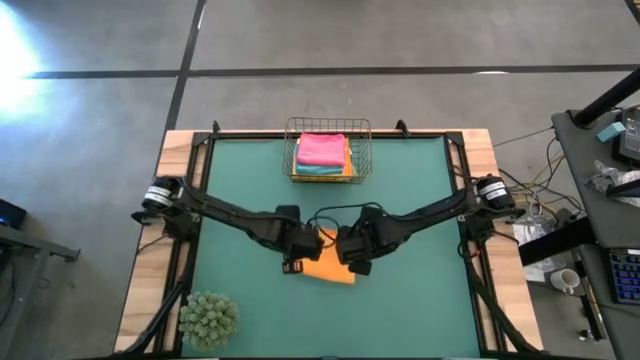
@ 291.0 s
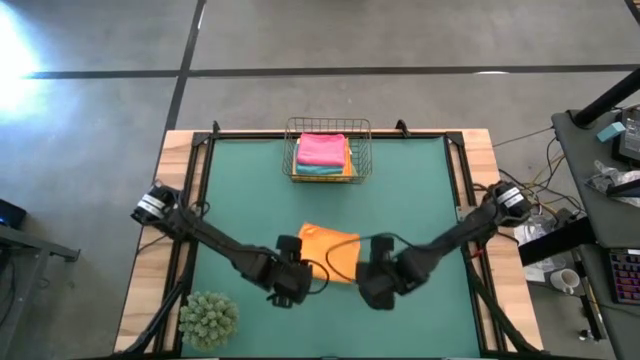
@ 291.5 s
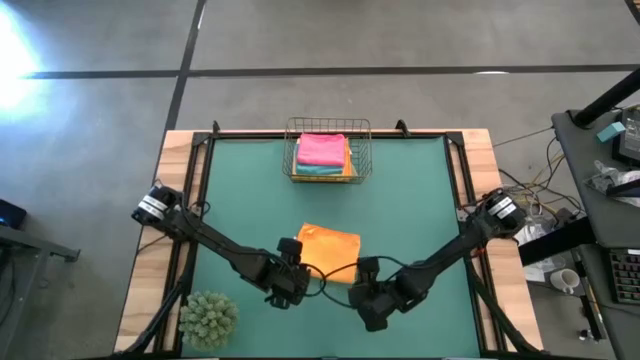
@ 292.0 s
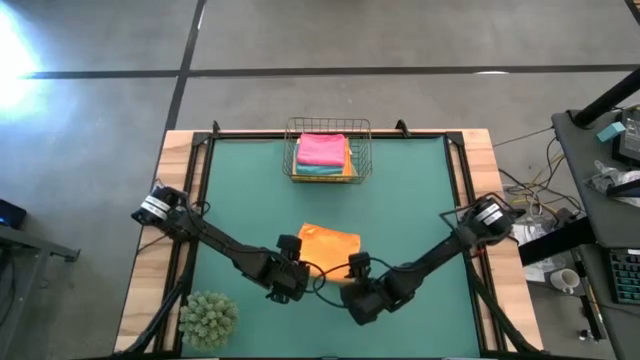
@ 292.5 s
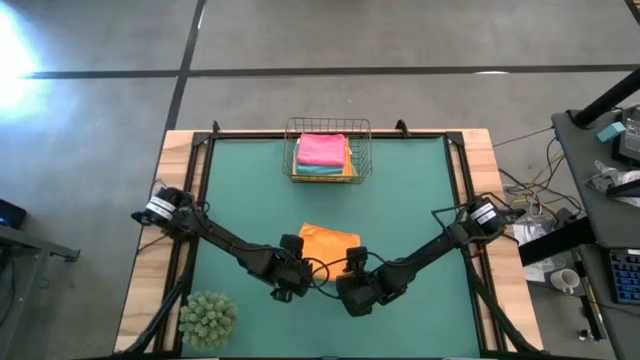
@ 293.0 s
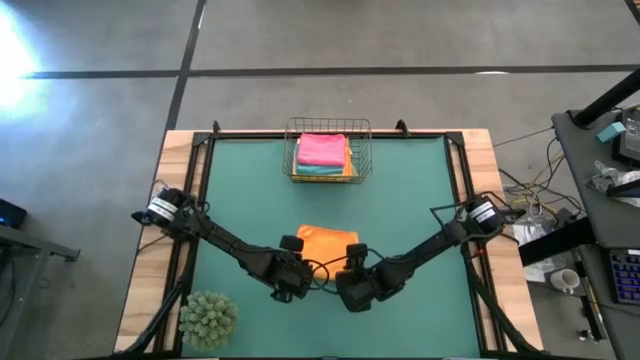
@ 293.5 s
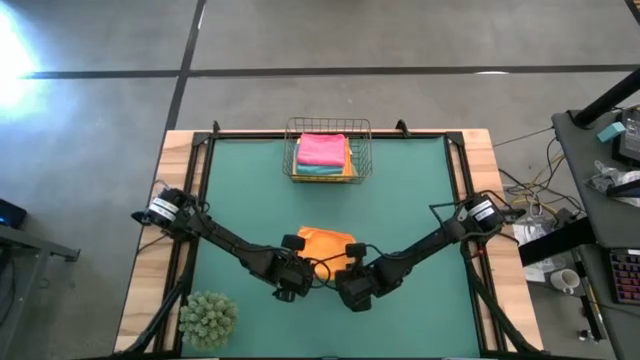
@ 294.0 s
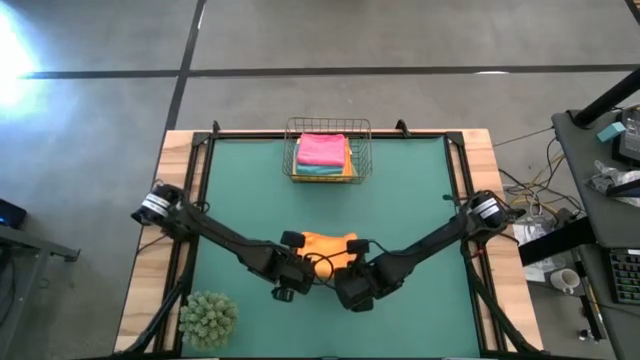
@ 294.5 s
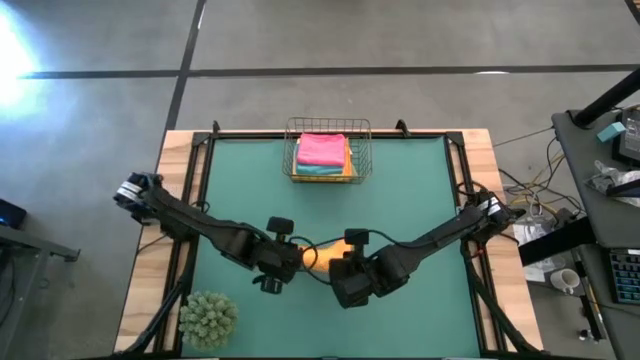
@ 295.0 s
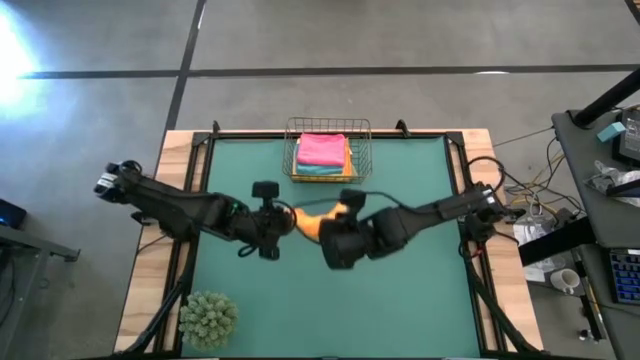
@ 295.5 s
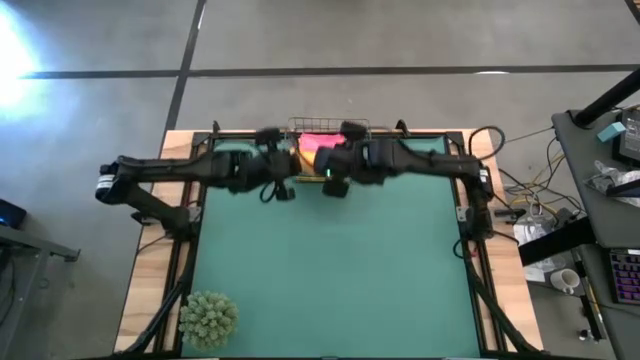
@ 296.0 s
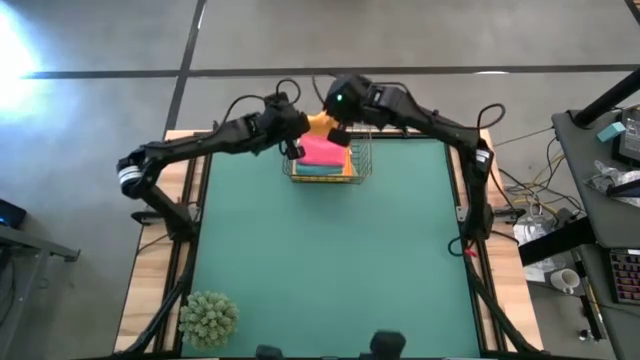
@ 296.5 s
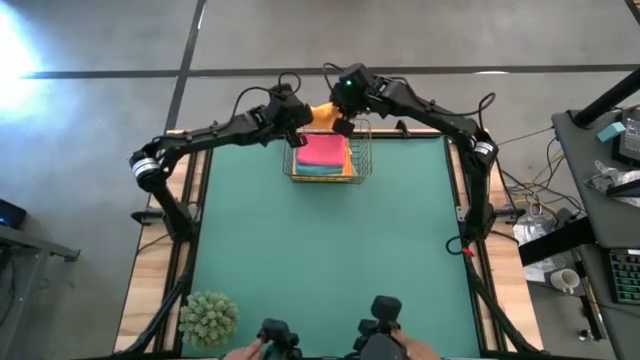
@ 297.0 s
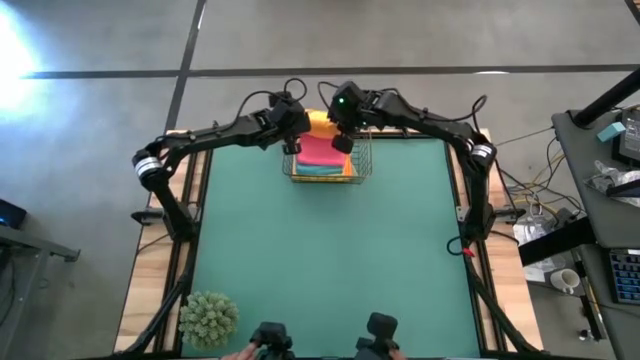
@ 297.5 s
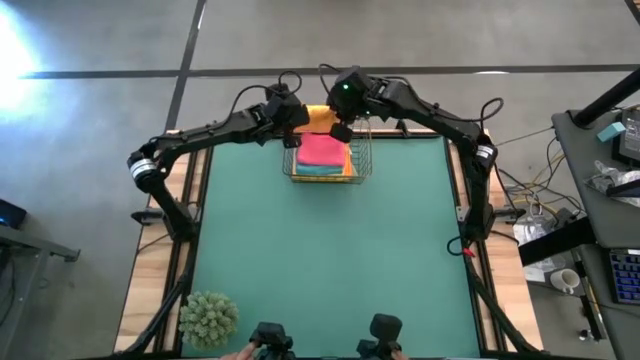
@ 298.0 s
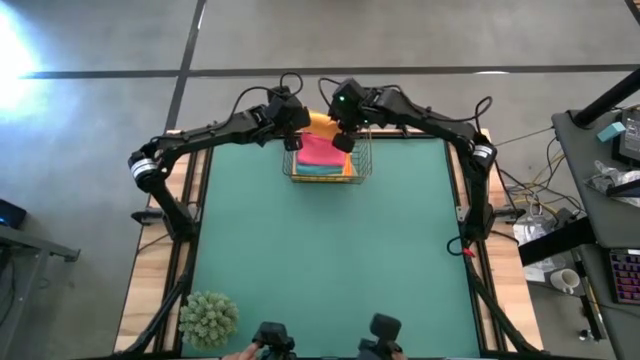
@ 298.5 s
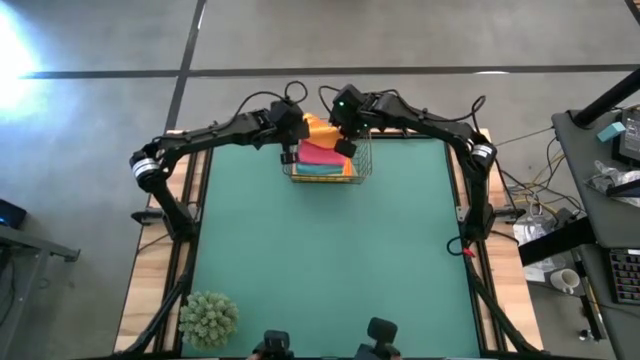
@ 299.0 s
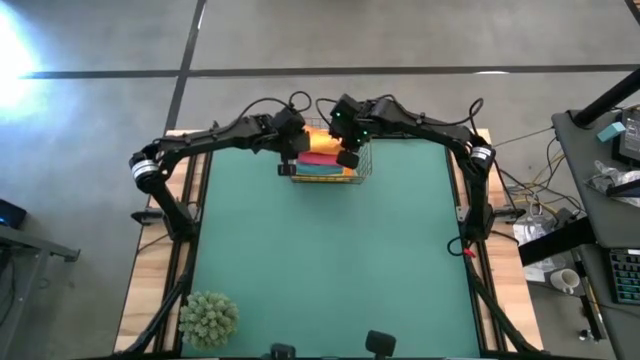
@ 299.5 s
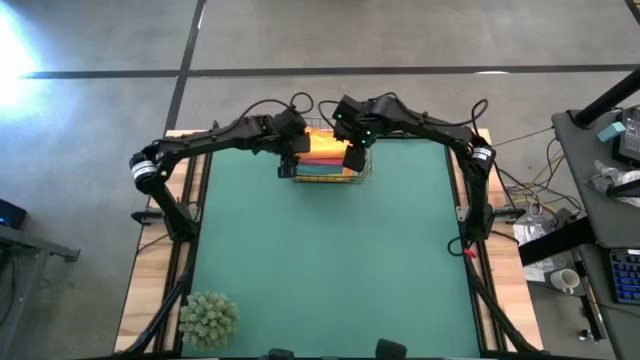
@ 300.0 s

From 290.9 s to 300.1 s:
Task: Fold microfiber towels
Put the yellow microfiber cloth into the wire basket

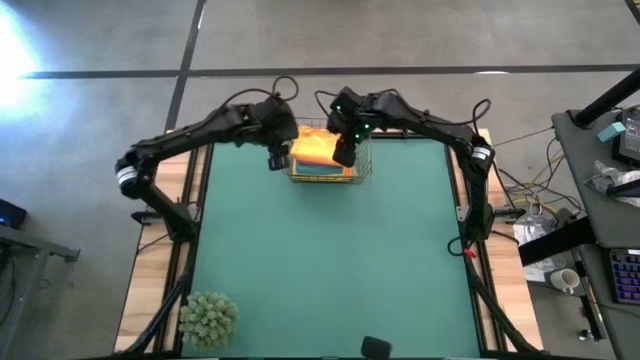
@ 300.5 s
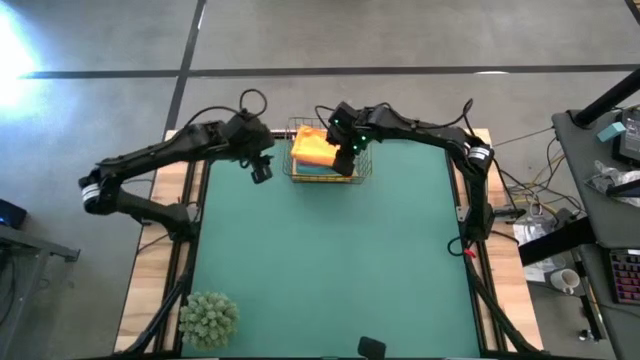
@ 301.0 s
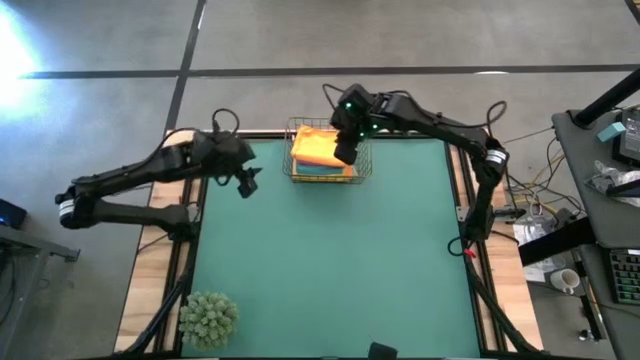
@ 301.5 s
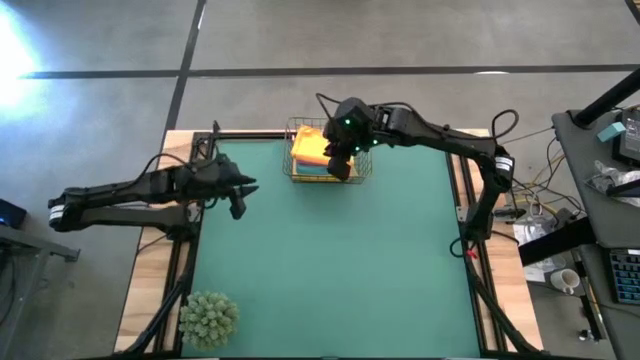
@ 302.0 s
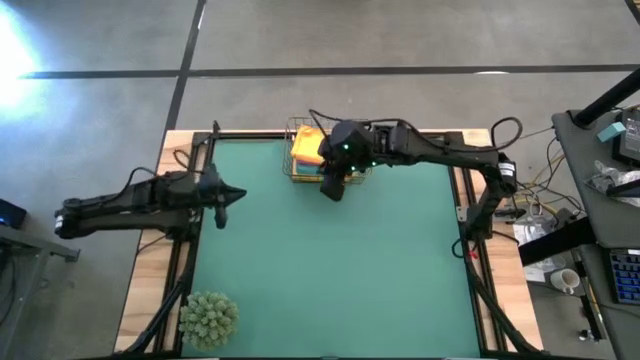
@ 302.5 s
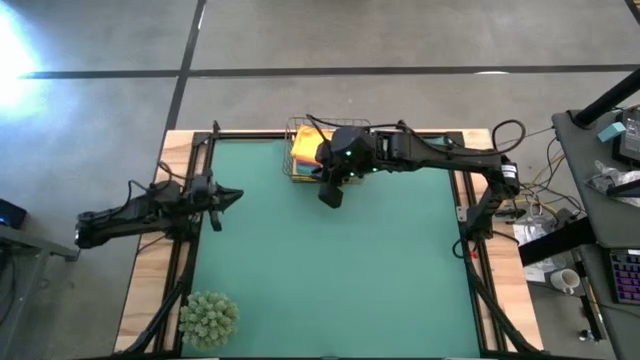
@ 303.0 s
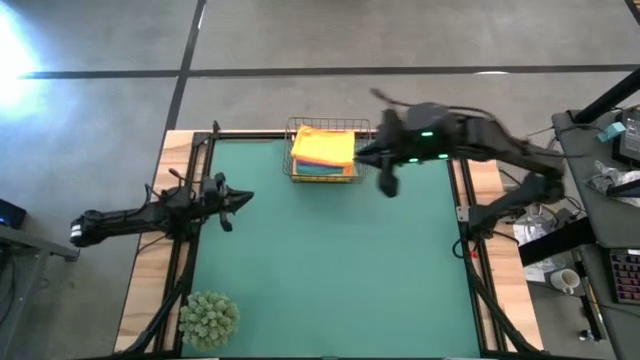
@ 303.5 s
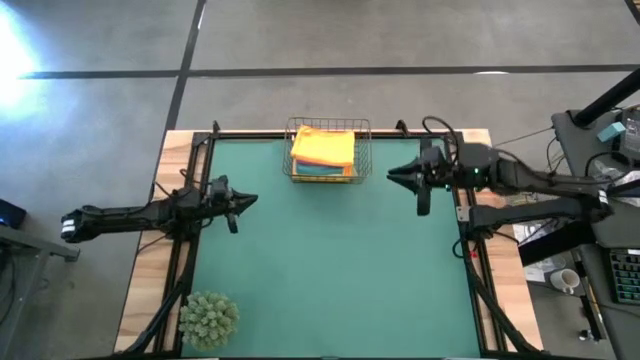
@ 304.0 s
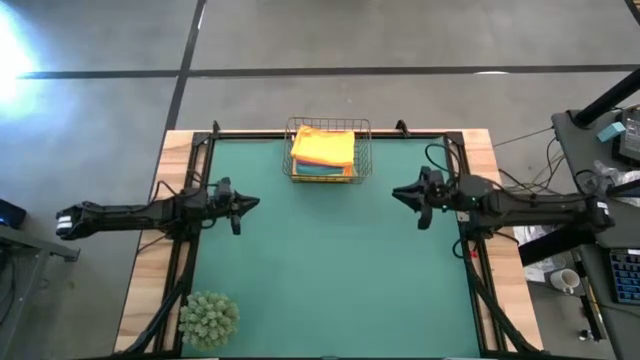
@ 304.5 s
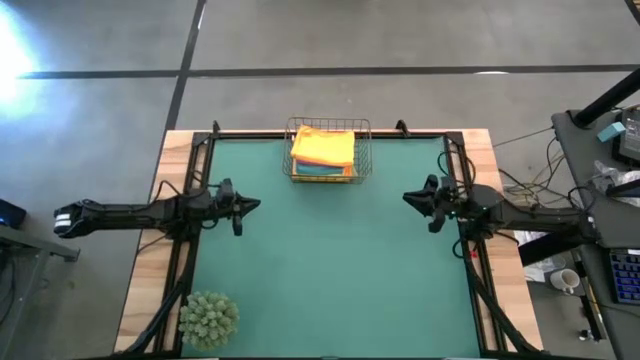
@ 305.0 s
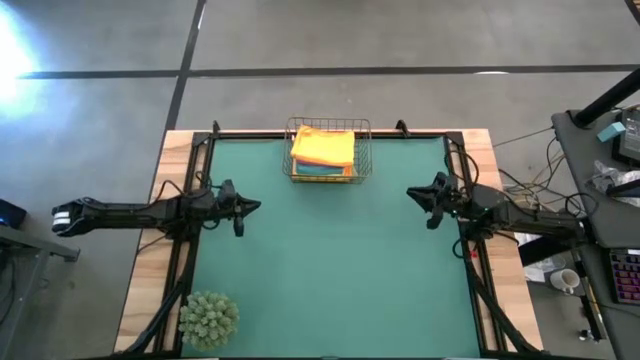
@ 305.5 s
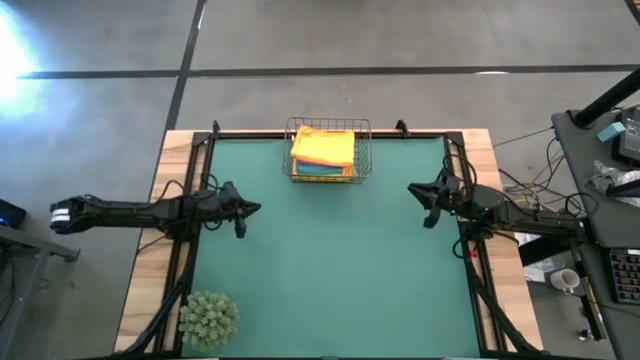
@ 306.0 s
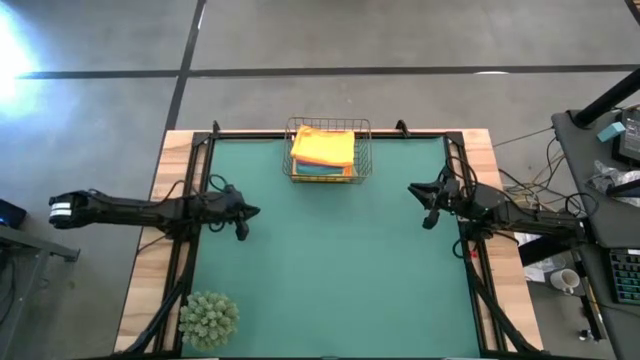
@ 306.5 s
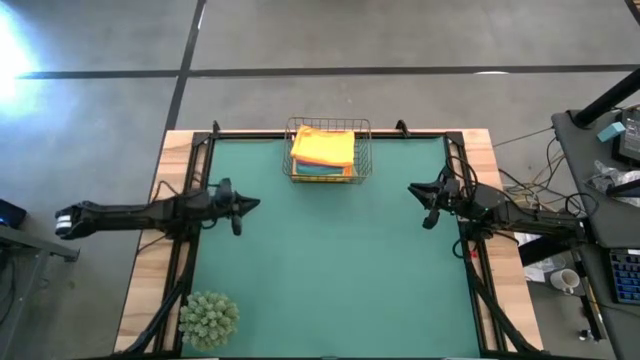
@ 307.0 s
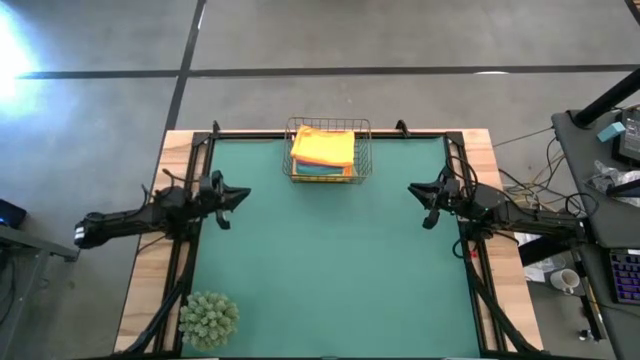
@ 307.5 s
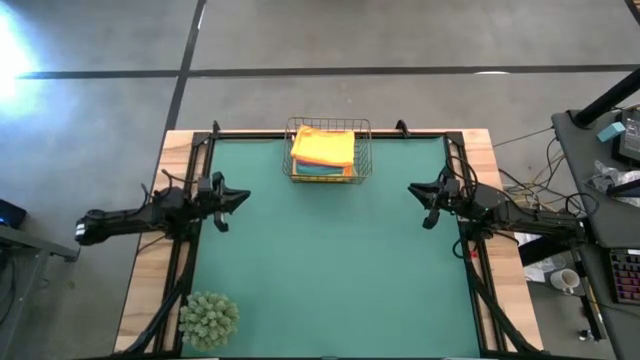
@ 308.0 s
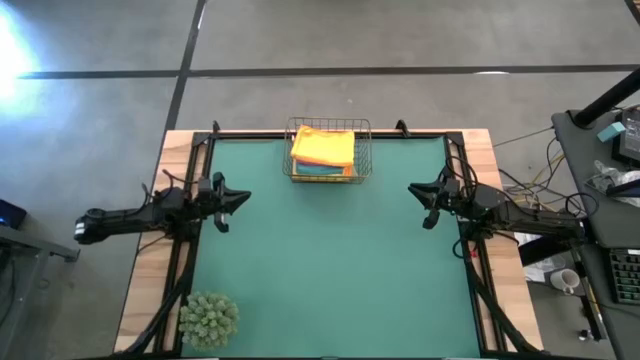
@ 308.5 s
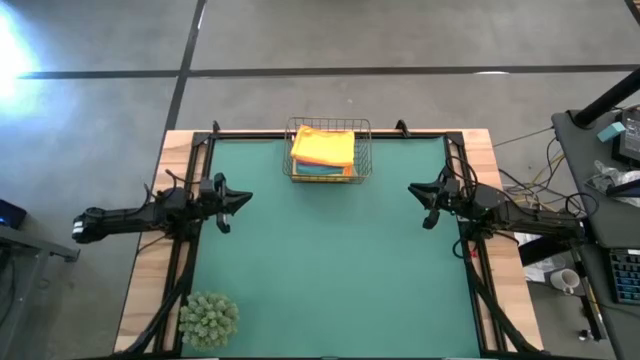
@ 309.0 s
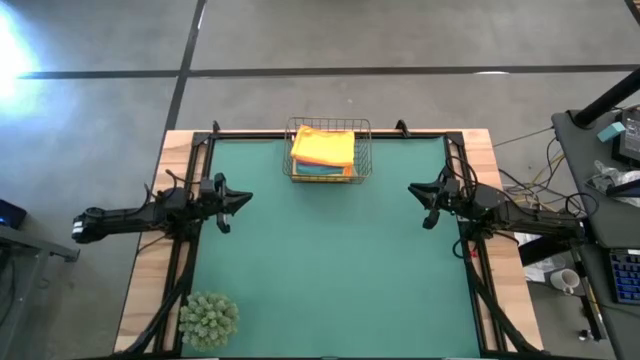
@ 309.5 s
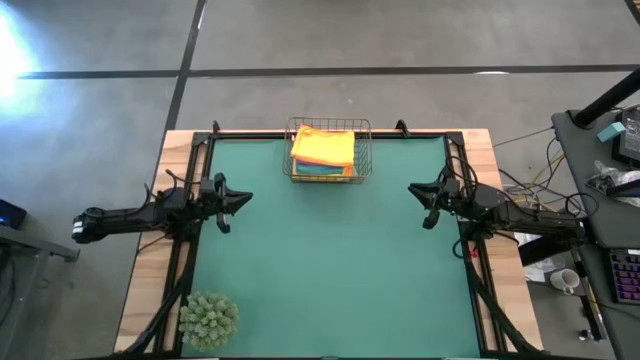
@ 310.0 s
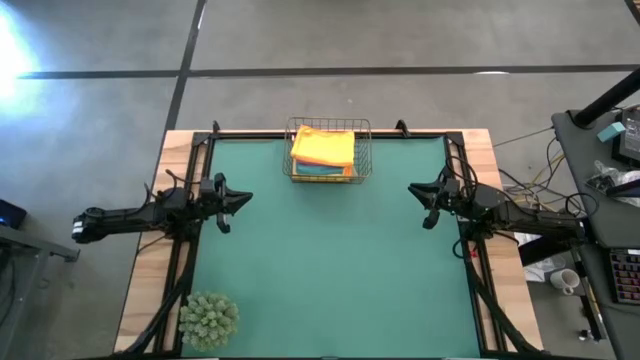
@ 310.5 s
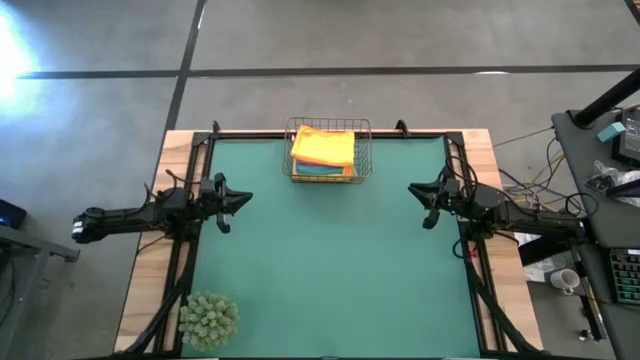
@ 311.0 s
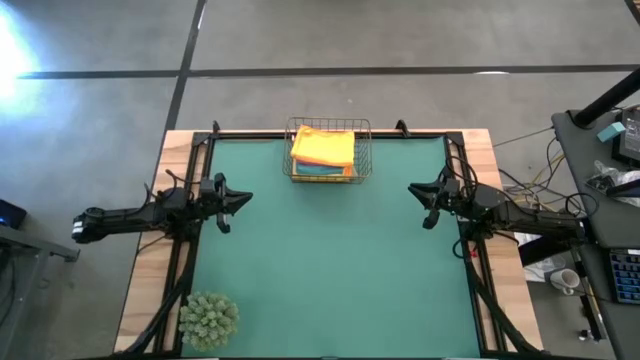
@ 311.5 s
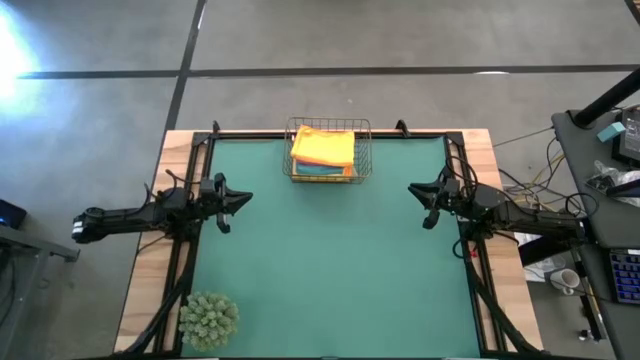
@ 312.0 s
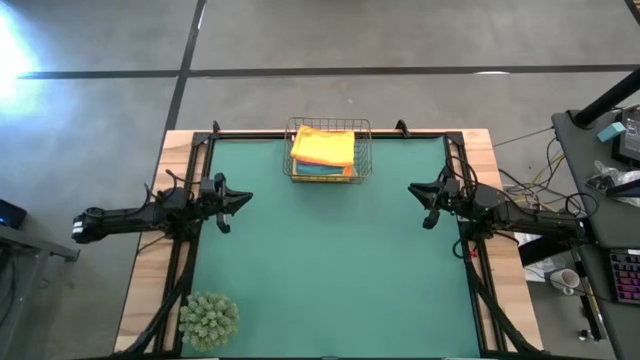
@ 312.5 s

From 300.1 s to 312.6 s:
Return to Home Position
